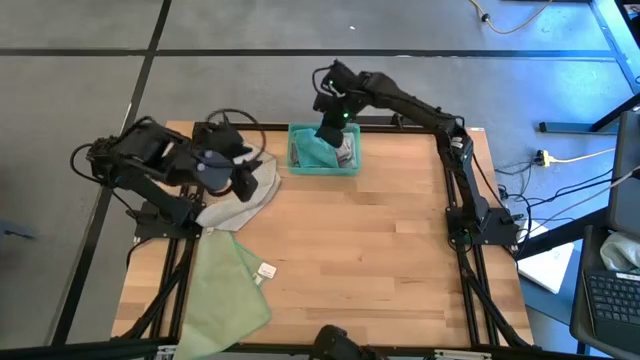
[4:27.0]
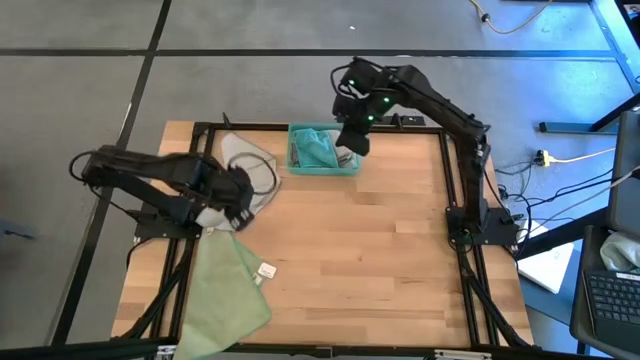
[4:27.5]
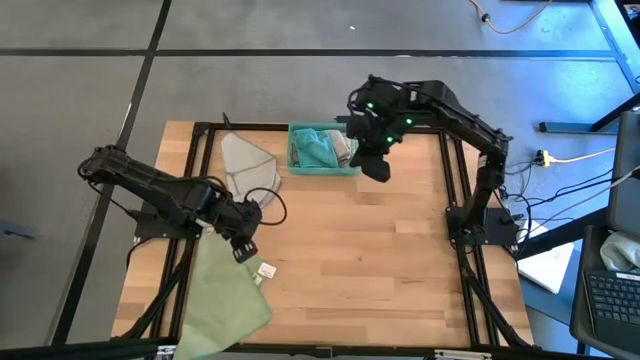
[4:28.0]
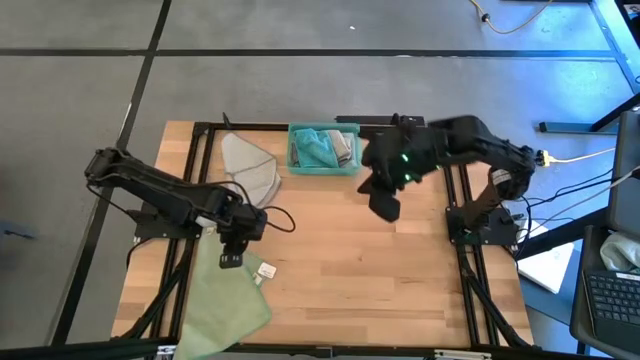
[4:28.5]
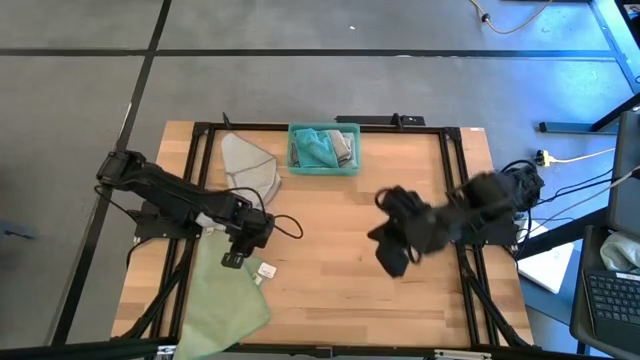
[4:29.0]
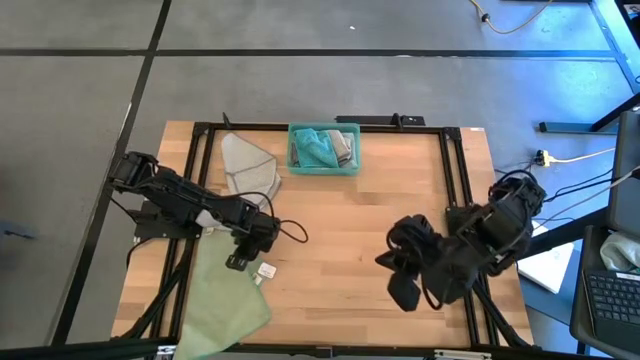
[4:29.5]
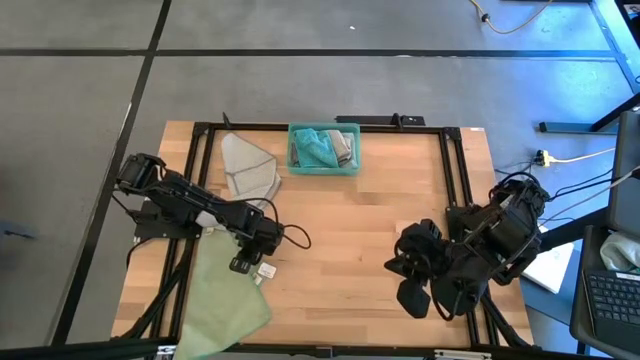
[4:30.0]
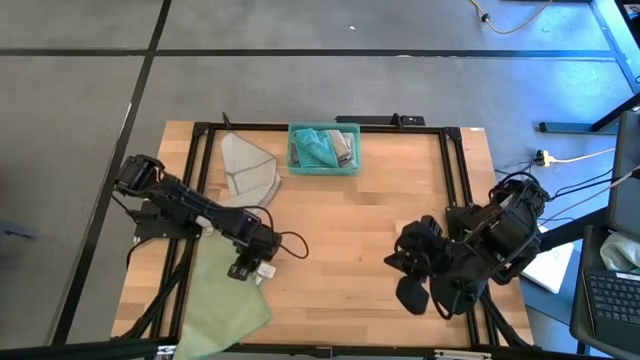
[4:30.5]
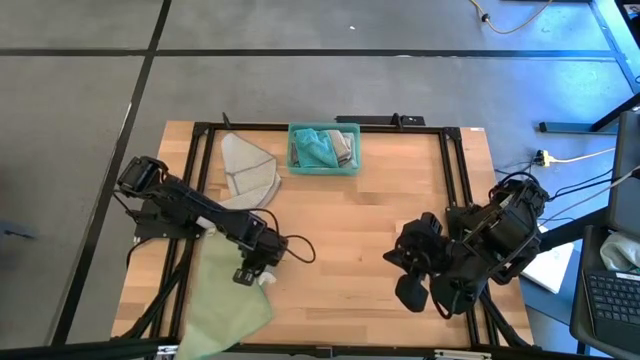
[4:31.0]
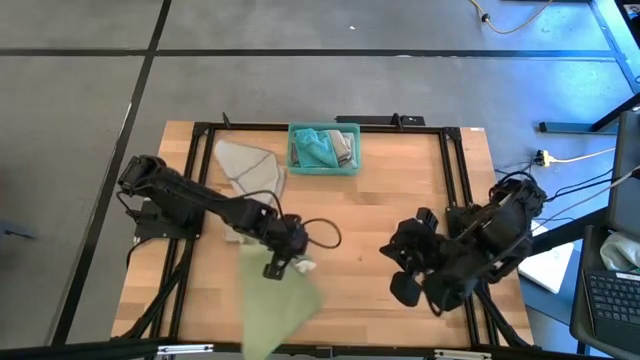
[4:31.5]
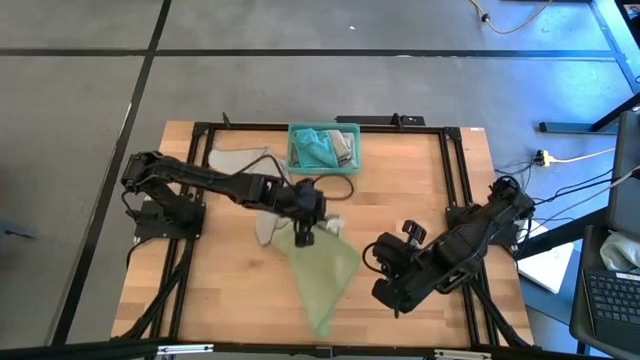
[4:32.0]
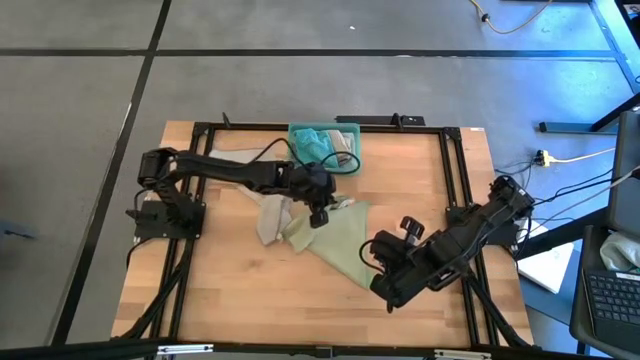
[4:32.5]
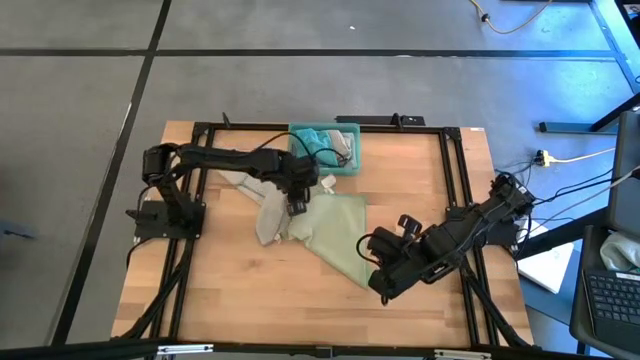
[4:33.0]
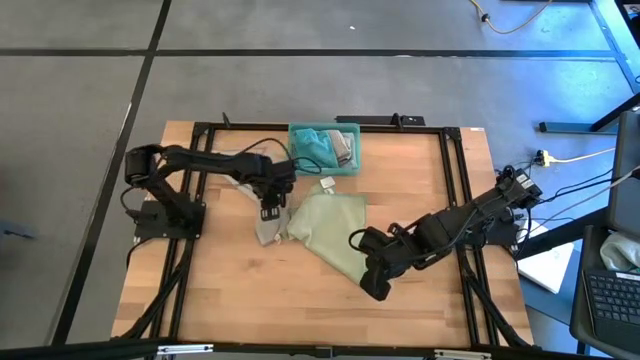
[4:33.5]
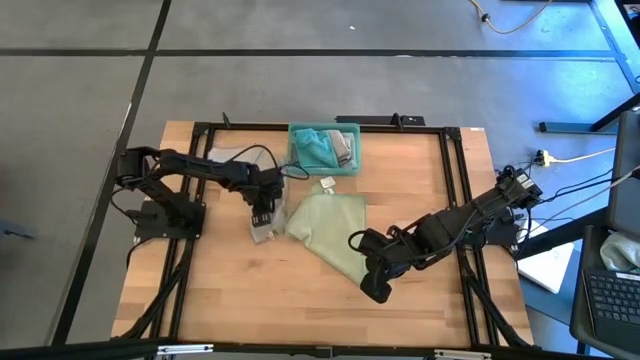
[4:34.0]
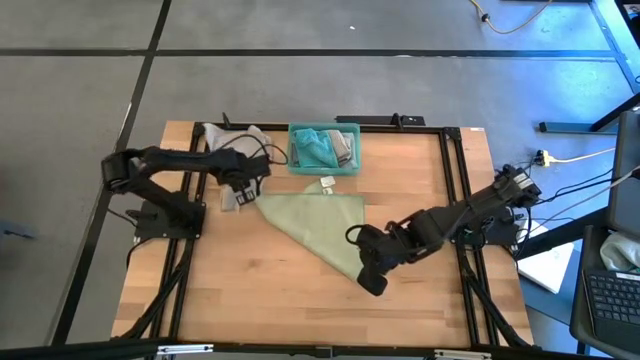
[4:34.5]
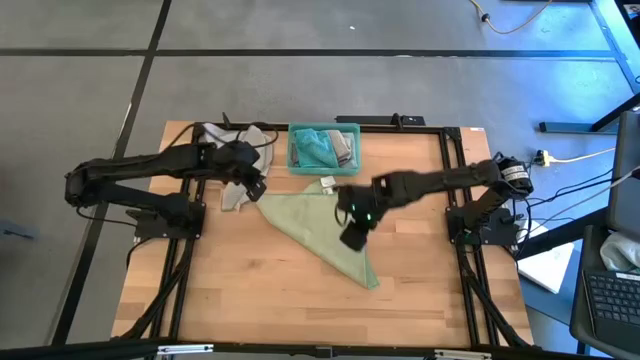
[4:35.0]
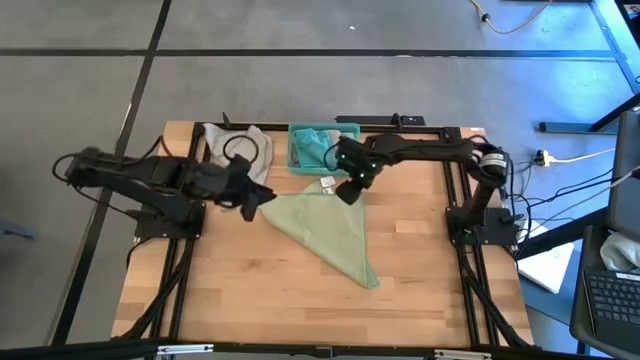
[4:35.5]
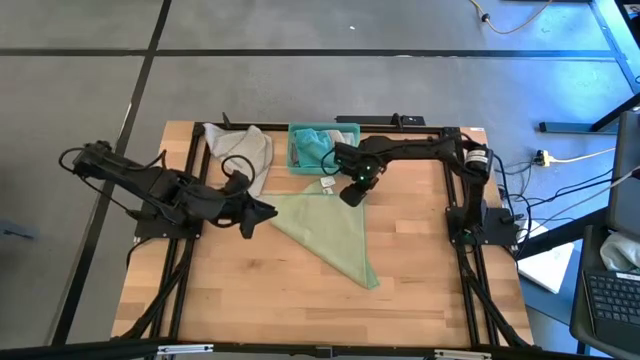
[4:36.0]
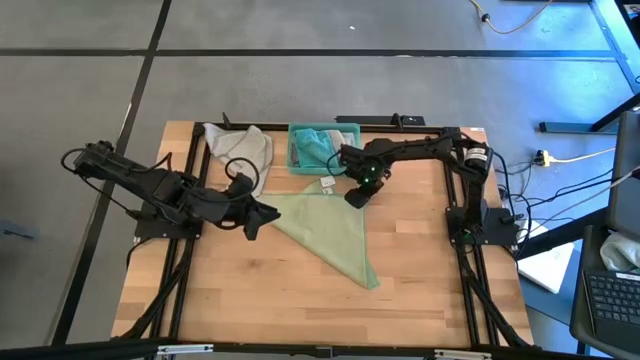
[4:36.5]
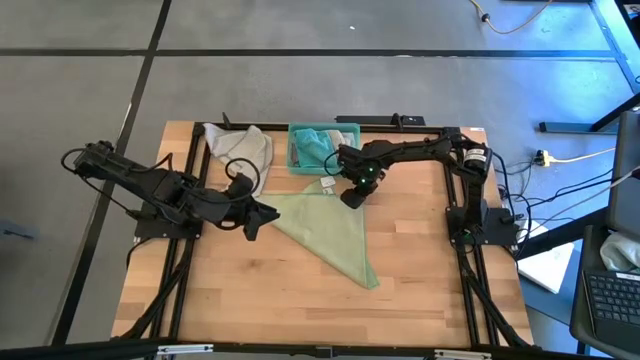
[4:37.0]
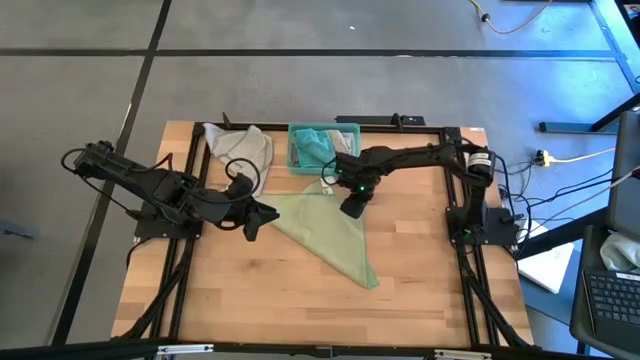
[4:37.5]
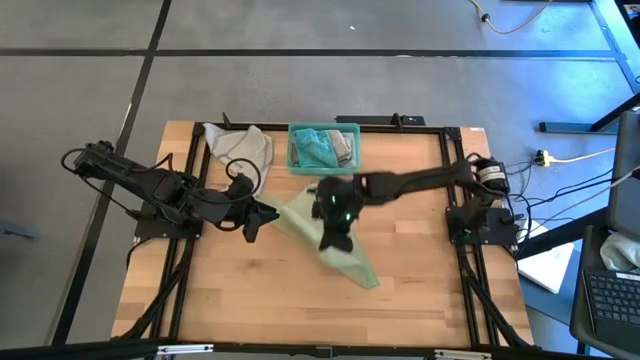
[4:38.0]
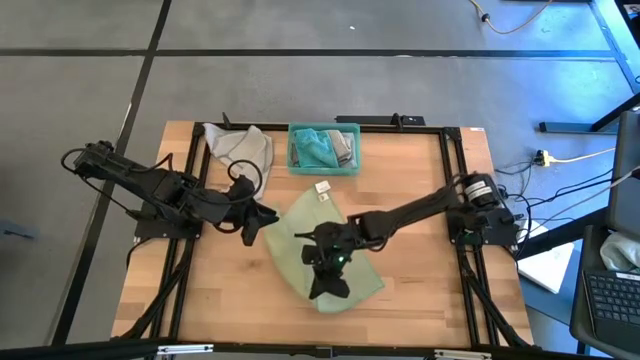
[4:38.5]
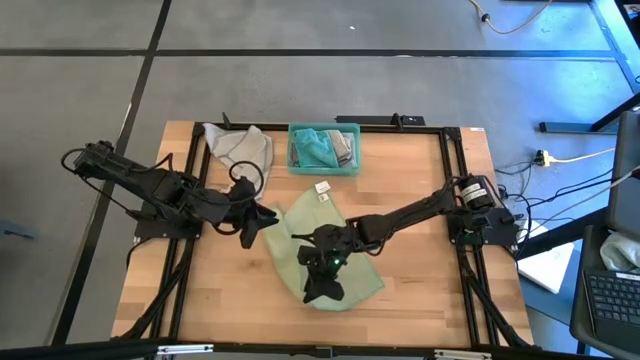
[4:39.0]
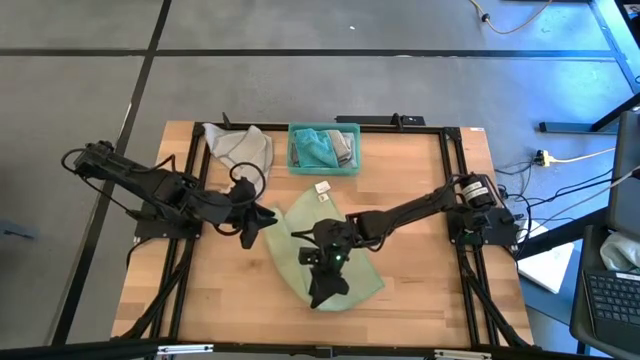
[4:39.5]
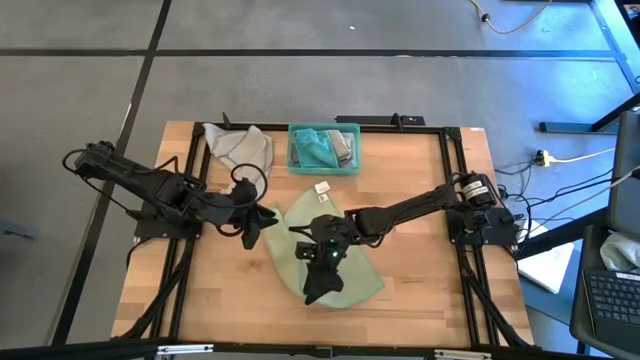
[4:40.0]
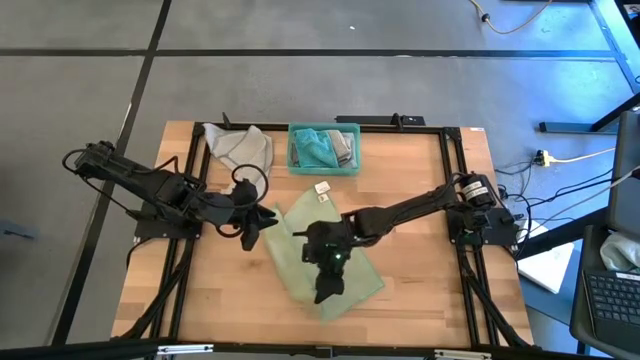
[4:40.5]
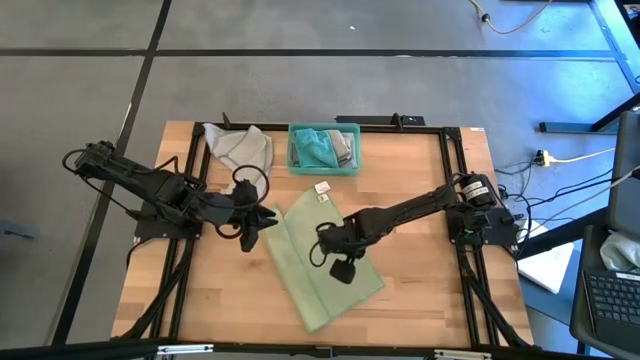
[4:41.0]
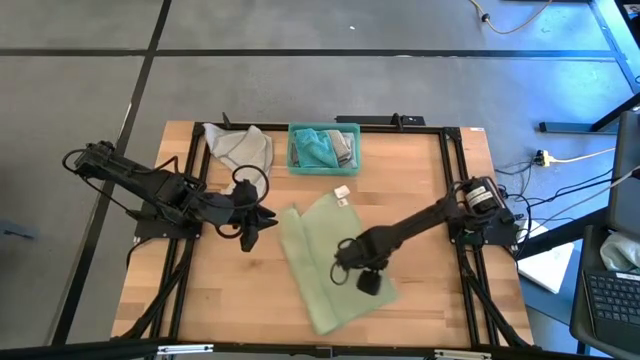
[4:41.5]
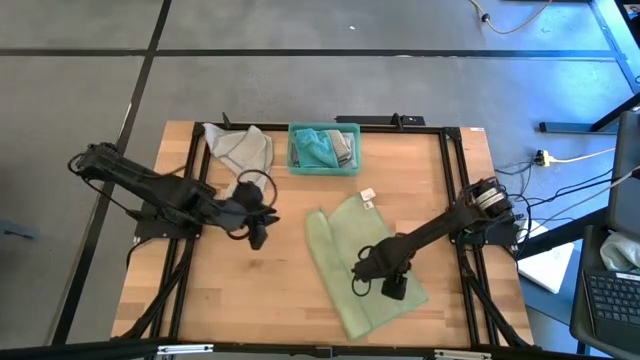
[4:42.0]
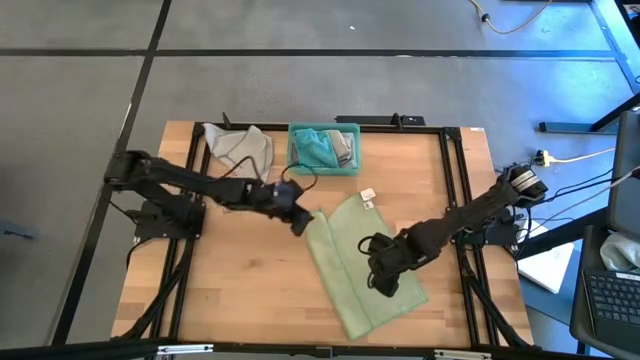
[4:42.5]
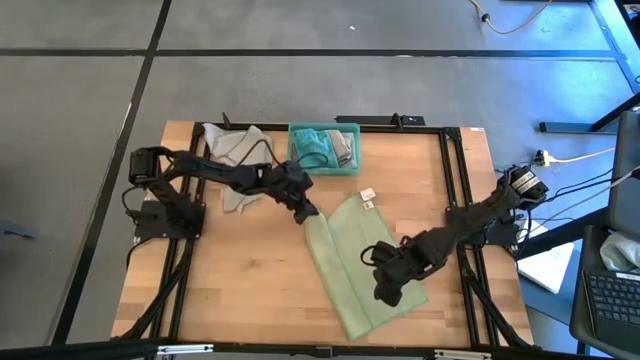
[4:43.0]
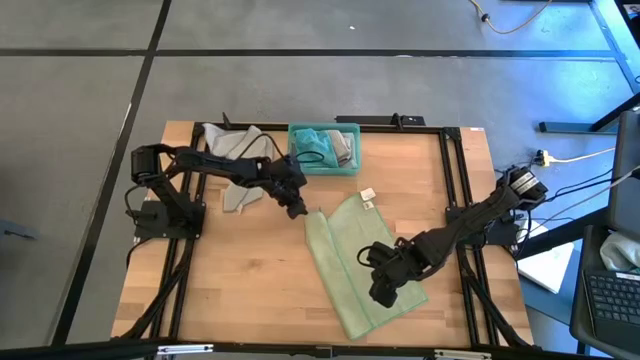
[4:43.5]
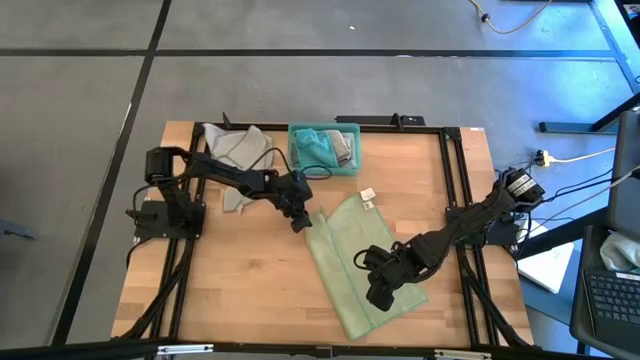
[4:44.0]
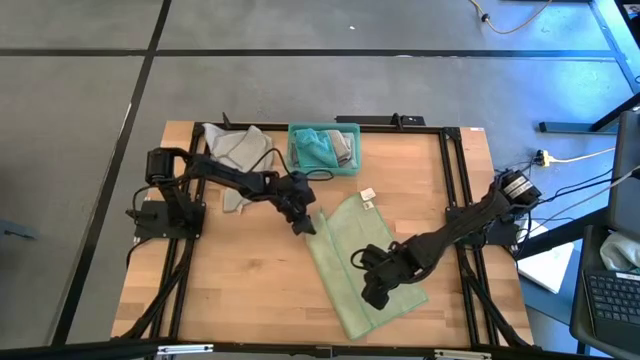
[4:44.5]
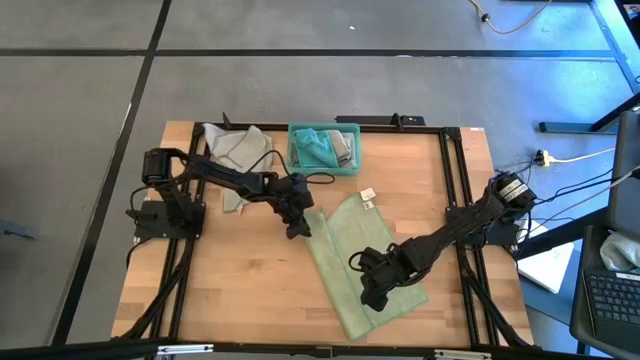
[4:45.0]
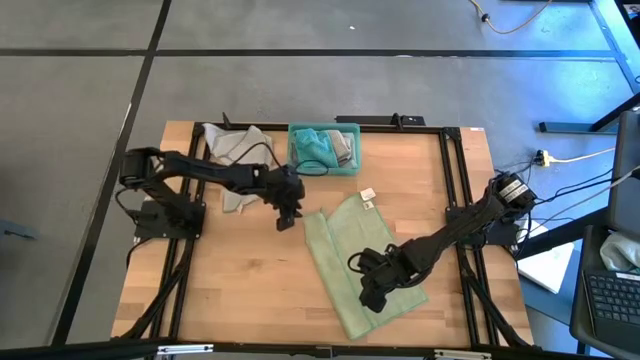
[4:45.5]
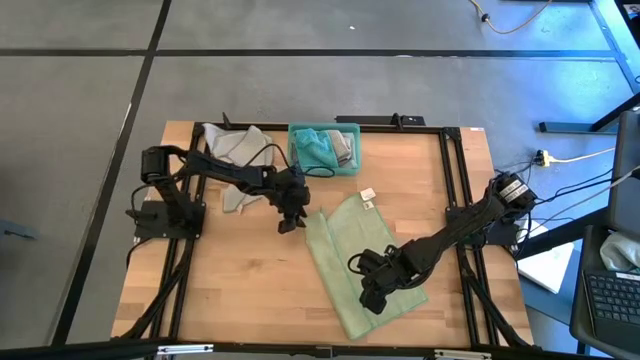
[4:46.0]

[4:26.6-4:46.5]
Task: Fold microfiber towels
Fold the green towel
